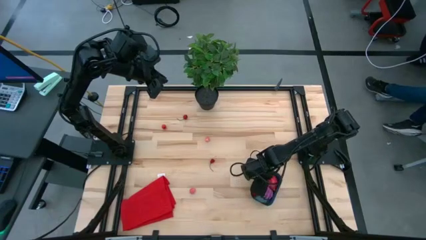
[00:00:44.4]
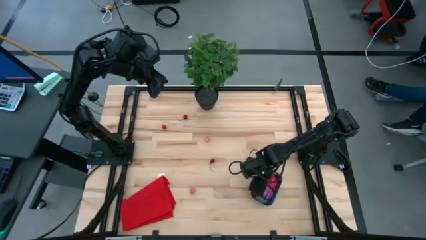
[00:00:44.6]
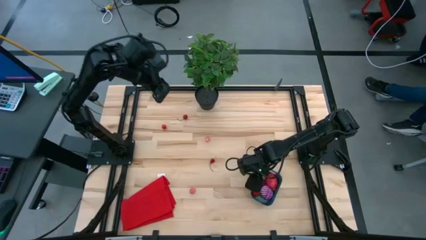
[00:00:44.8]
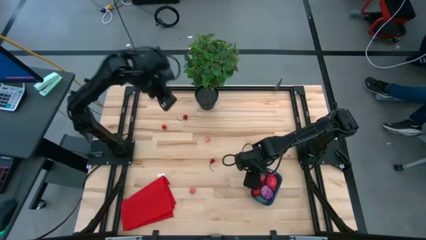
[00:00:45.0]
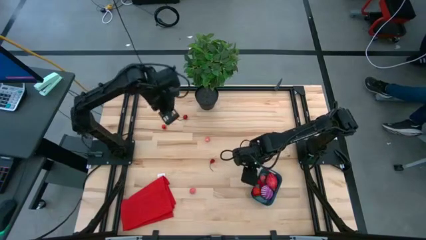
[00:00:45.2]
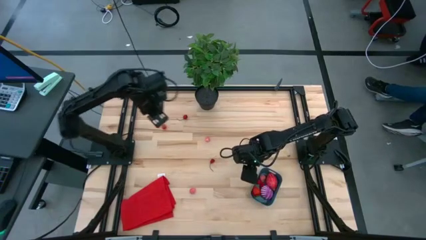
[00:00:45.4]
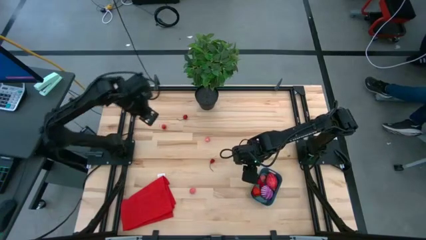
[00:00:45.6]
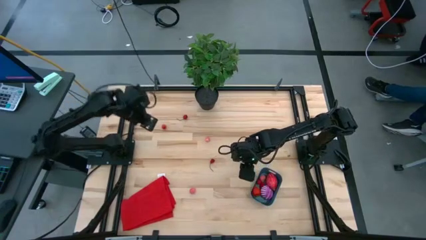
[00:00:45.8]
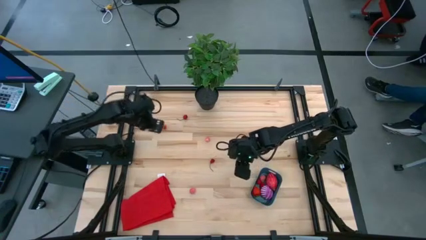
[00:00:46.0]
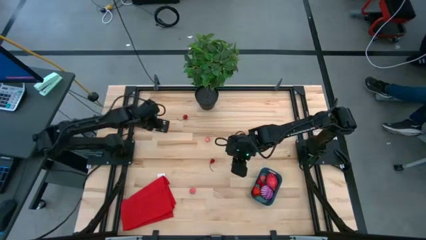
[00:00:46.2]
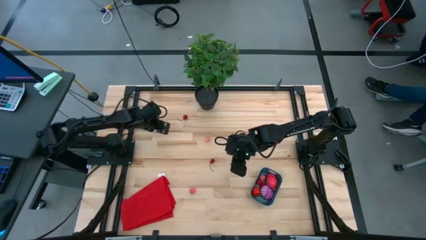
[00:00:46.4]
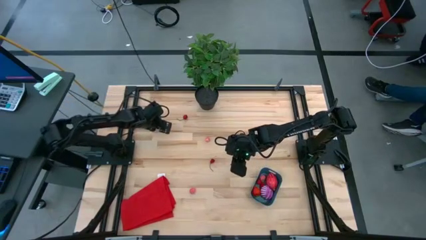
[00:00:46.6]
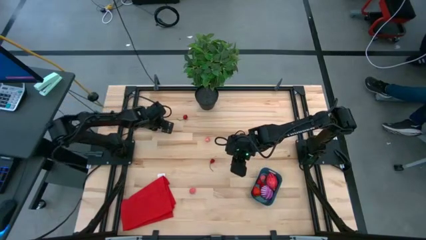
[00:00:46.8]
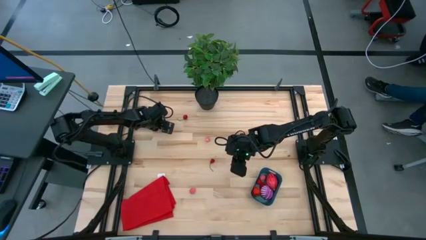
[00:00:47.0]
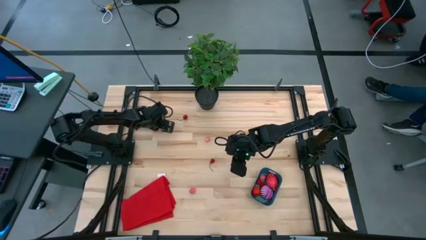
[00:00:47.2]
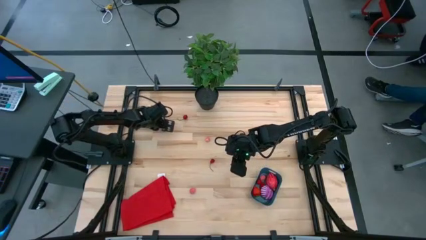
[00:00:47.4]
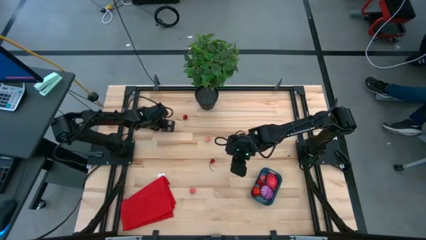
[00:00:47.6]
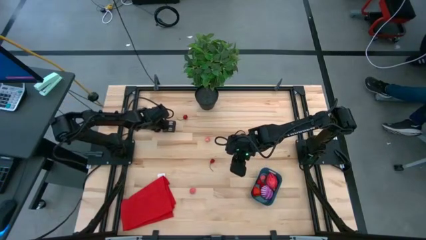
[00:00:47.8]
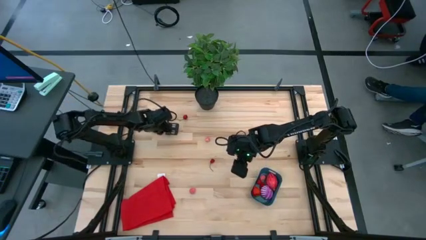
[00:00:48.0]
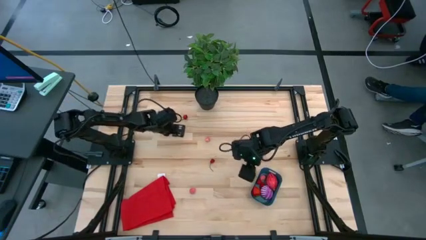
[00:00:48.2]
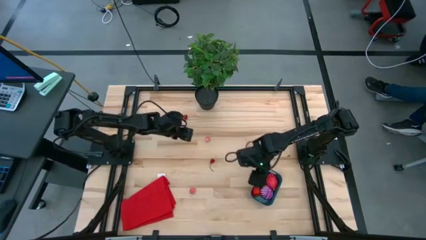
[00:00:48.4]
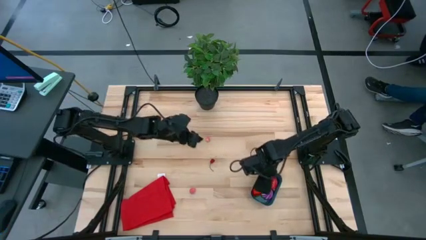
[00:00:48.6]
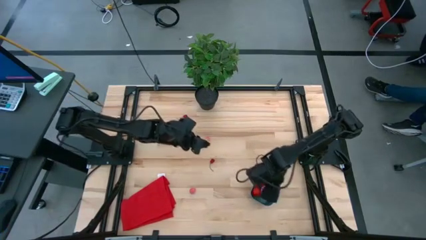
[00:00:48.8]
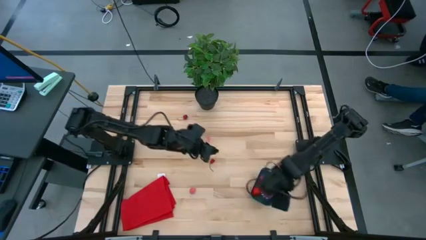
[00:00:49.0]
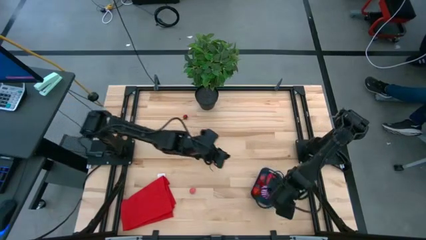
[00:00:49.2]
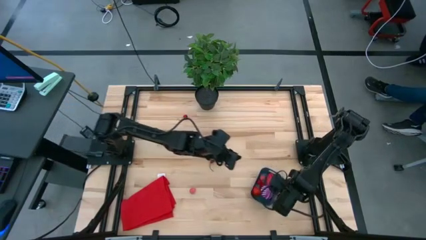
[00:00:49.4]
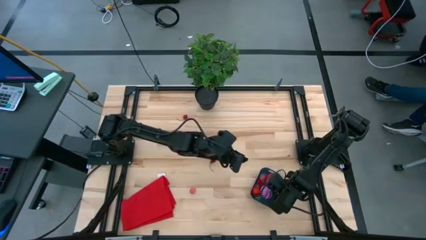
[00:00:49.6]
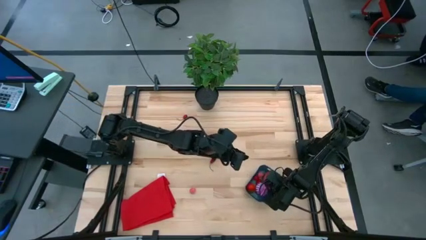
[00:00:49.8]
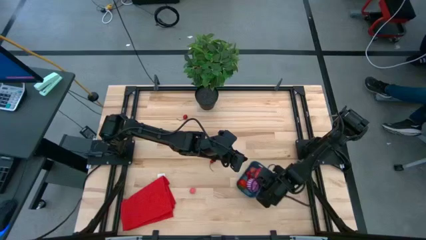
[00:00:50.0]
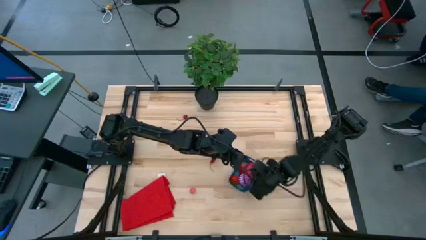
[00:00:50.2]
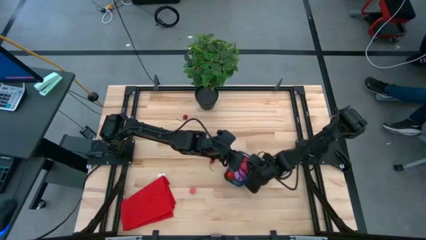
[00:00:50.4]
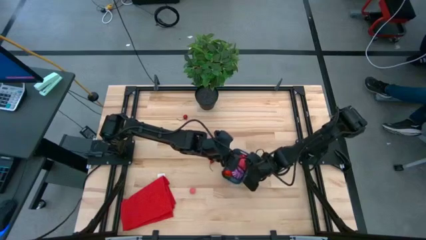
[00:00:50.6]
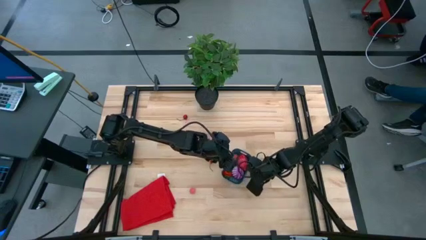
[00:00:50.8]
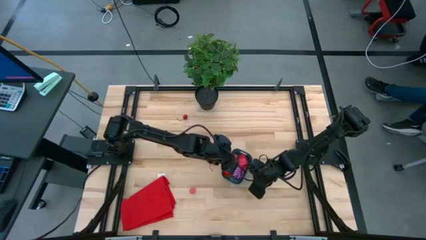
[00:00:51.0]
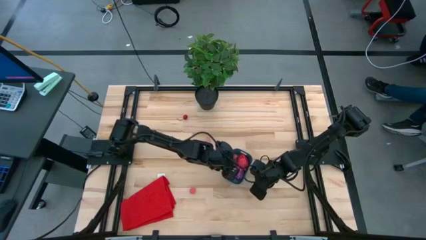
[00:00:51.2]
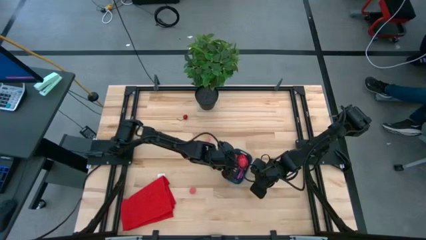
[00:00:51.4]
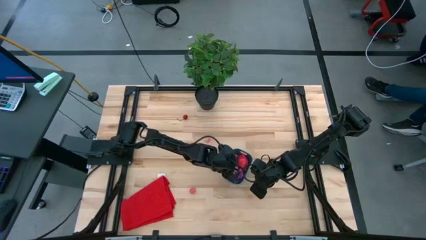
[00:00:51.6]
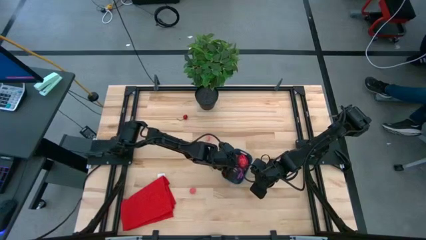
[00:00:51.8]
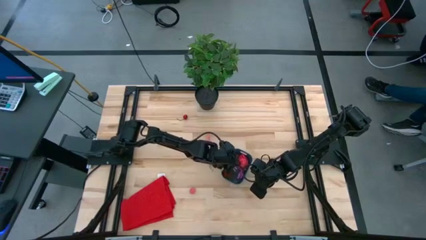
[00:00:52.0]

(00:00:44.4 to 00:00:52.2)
Task: Pick and placing Produce into tupperware
Put the raspberry into the bin

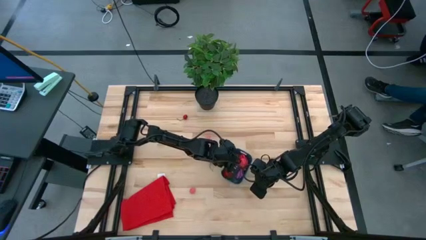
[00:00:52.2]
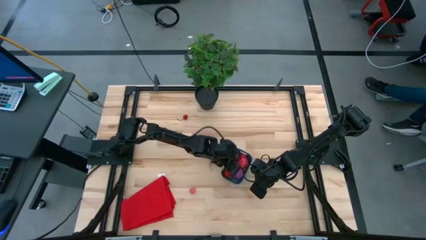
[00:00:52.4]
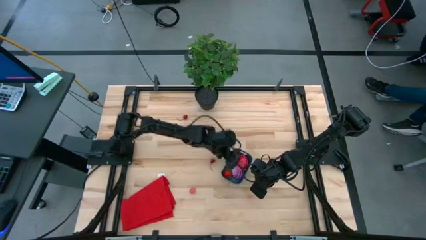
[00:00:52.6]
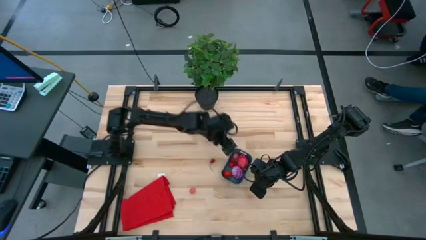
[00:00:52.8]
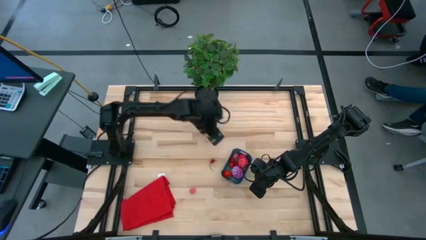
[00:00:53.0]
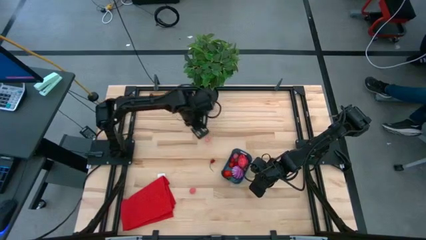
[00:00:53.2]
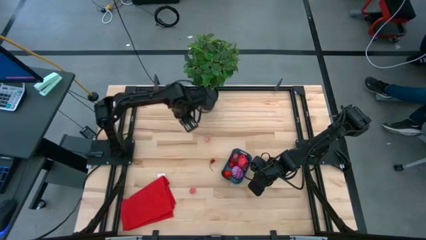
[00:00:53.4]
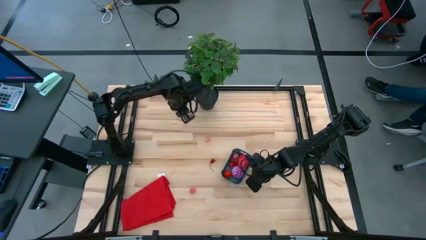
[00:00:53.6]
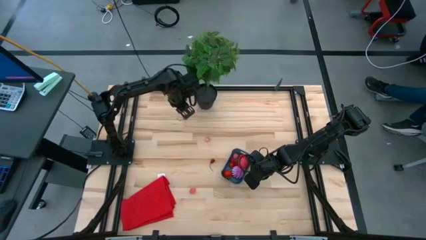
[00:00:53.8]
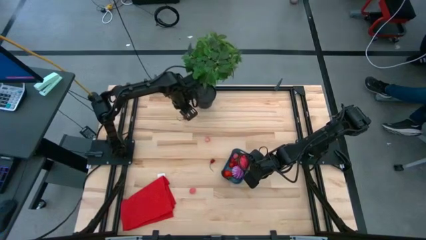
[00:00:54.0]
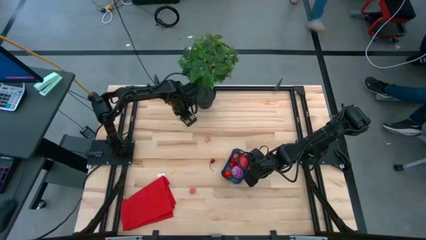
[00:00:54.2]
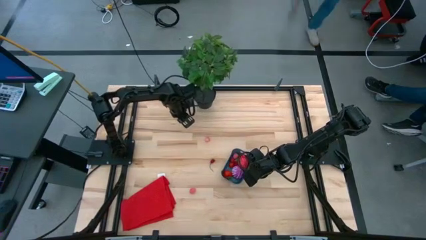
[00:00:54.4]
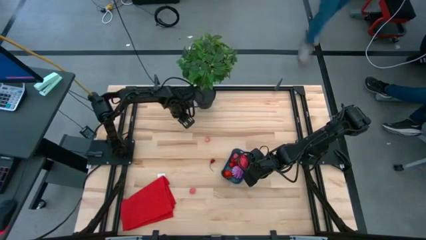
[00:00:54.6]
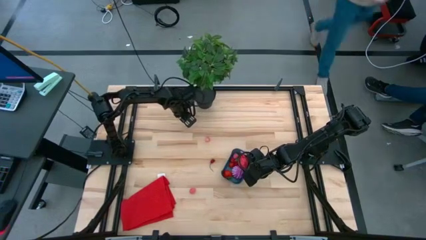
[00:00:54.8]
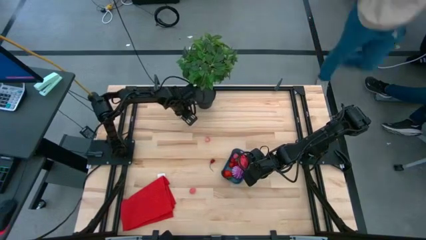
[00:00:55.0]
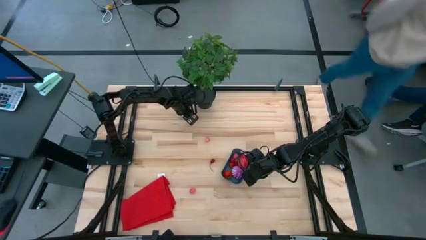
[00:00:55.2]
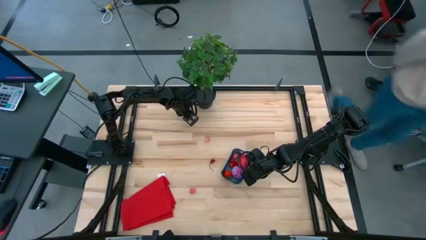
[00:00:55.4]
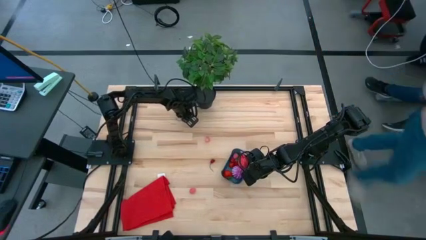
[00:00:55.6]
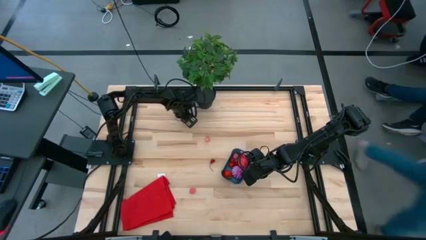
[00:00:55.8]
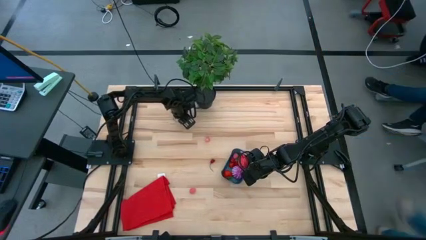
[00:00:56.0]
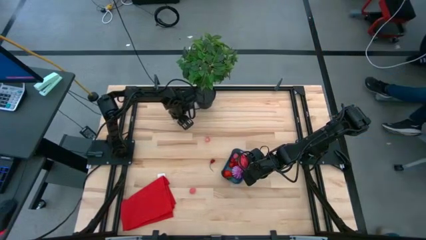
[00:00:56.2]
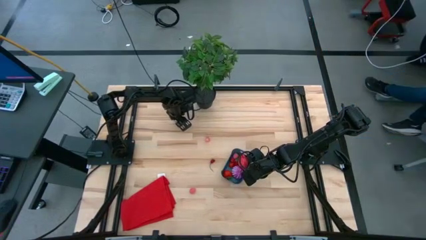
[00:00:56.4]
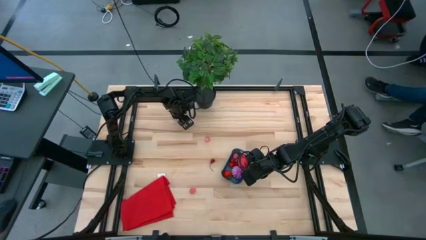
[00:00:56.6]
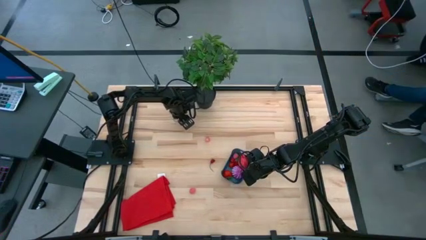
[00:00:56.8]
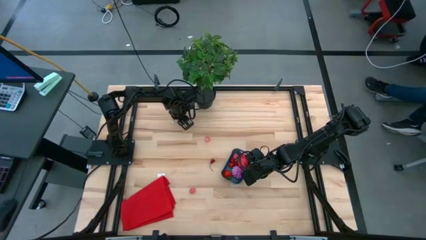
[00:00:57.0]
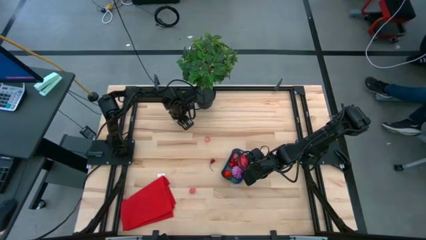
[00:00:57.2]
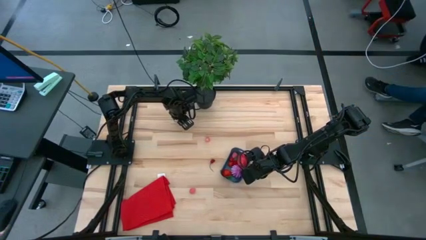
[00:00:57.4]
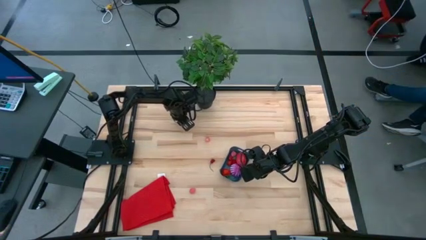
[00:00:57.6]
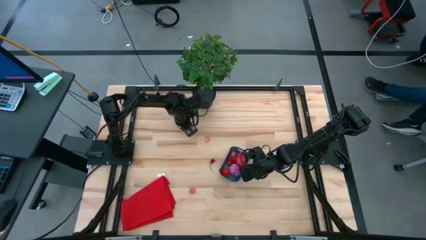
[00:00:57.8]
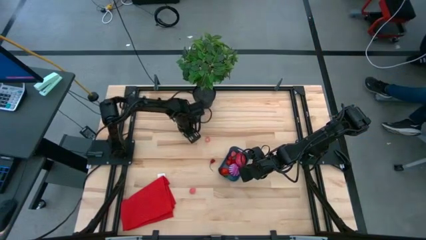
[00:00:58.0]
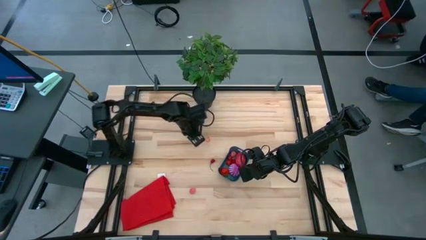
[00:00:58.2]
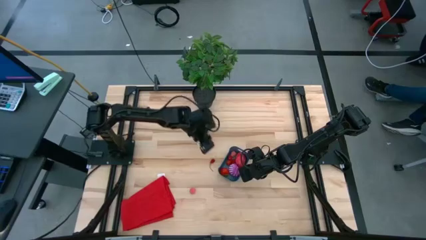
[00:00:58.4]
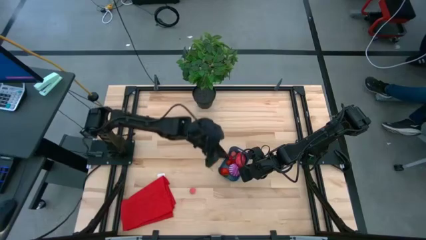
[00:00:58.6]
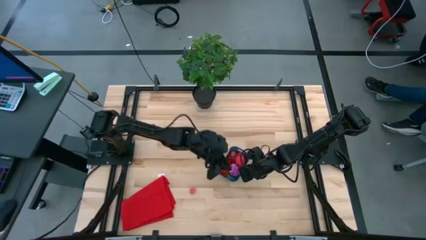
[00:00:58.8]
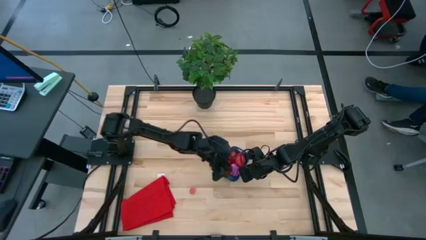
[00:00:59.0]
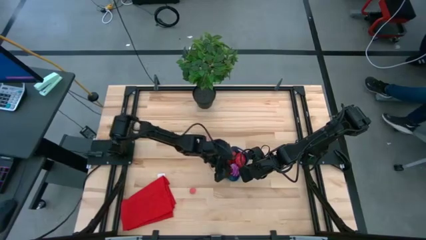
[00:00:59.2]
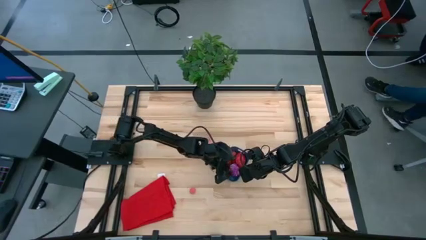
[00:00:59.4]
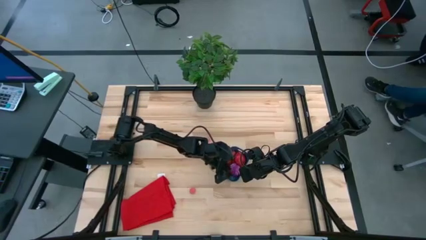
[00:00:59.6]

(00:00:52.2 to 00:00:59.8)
Put the cherry into the bin
